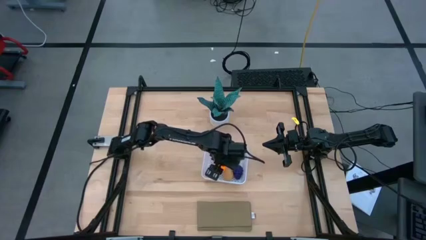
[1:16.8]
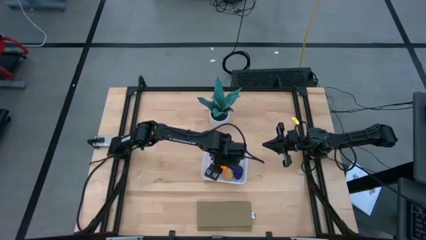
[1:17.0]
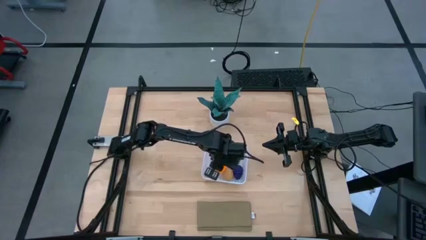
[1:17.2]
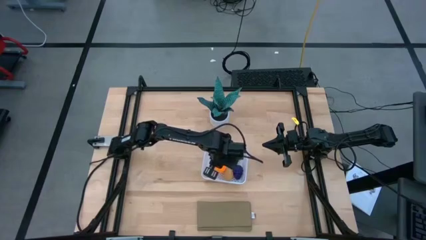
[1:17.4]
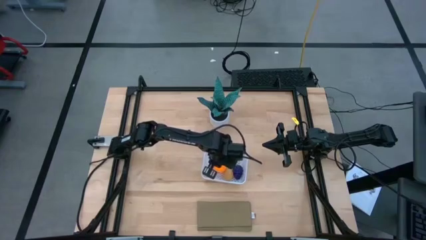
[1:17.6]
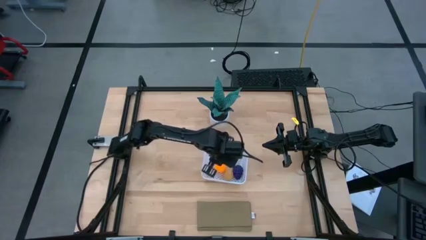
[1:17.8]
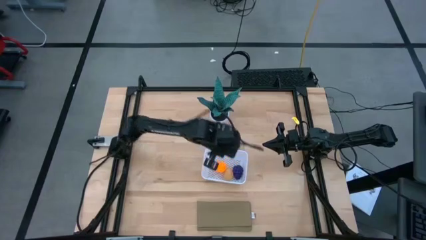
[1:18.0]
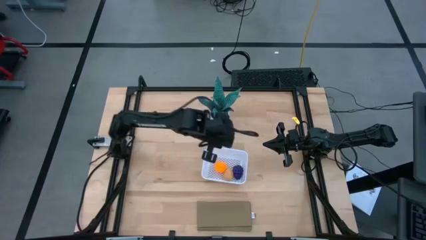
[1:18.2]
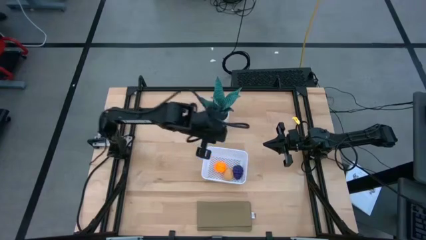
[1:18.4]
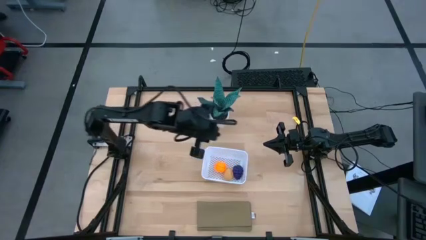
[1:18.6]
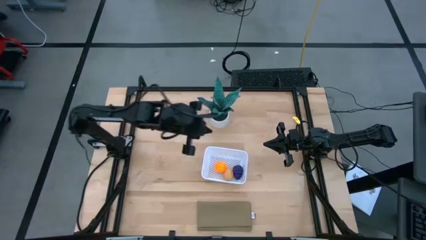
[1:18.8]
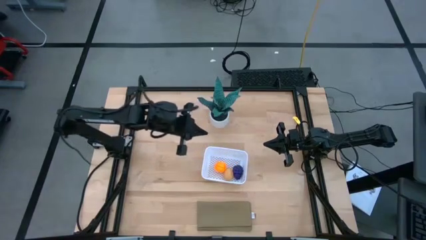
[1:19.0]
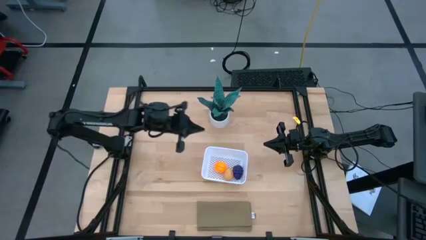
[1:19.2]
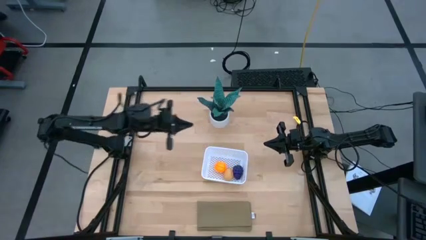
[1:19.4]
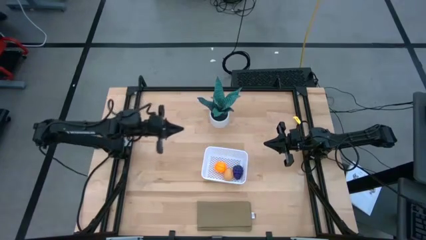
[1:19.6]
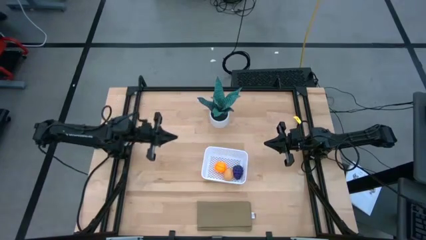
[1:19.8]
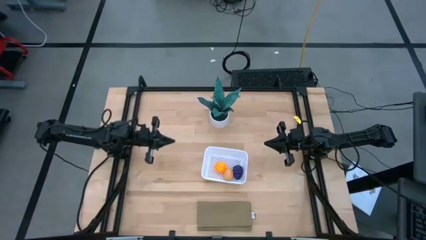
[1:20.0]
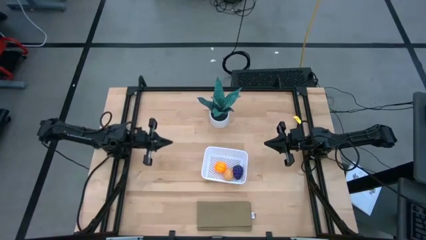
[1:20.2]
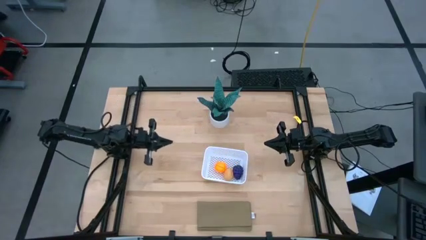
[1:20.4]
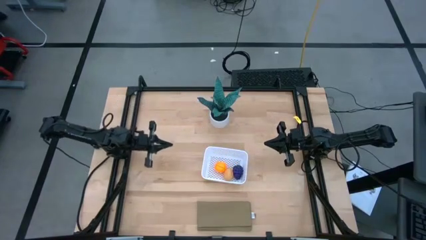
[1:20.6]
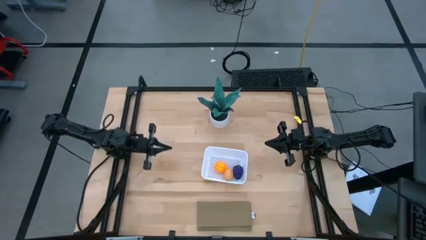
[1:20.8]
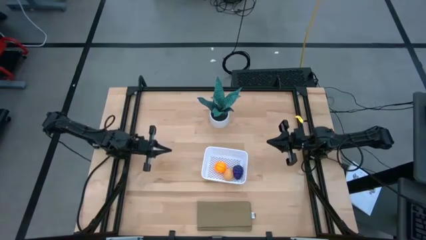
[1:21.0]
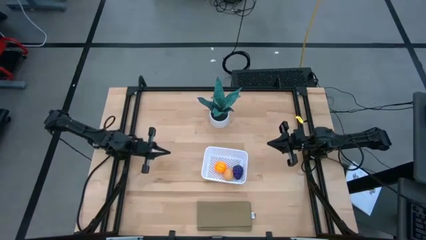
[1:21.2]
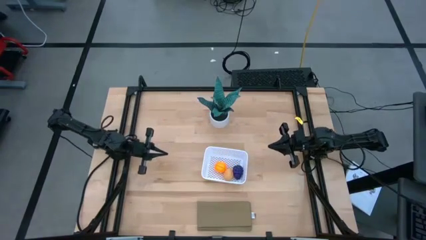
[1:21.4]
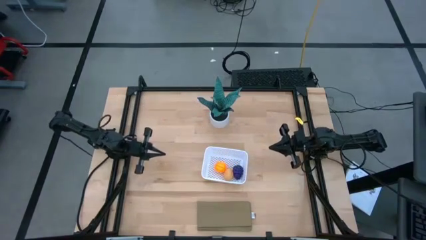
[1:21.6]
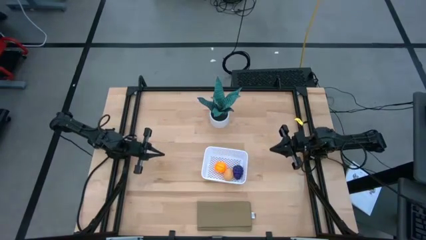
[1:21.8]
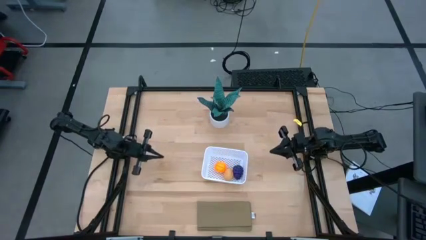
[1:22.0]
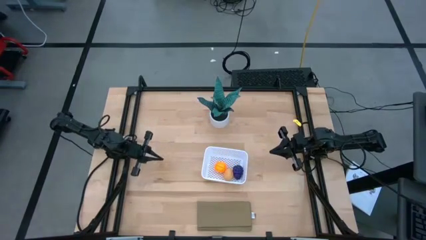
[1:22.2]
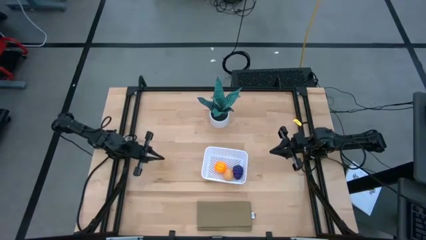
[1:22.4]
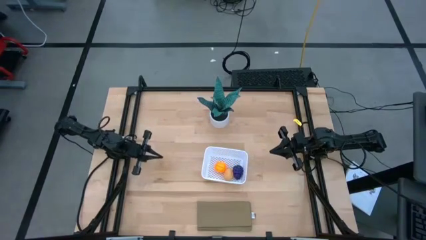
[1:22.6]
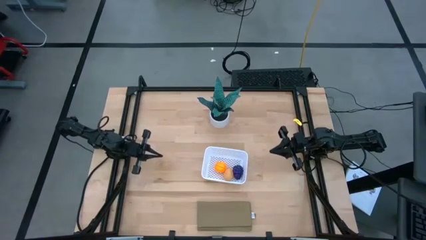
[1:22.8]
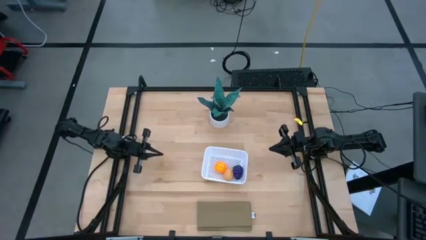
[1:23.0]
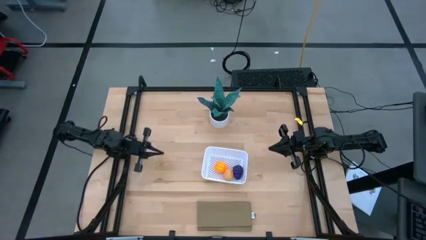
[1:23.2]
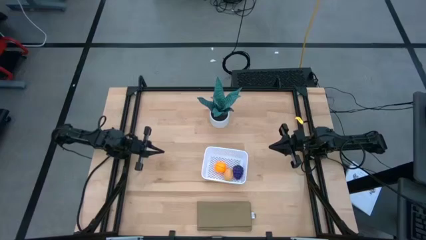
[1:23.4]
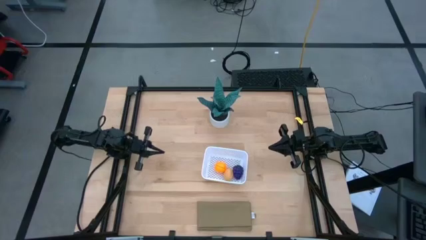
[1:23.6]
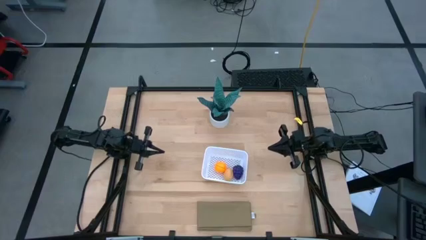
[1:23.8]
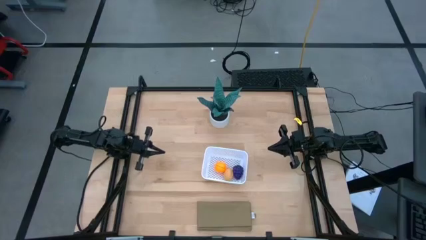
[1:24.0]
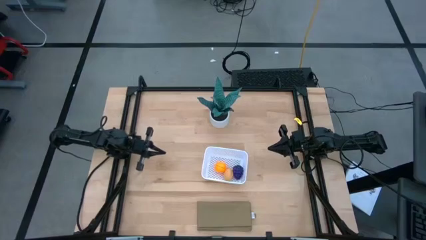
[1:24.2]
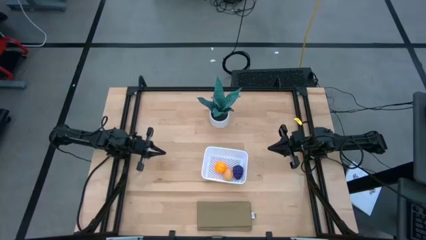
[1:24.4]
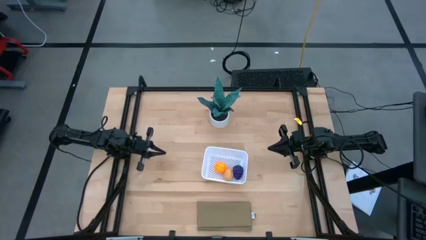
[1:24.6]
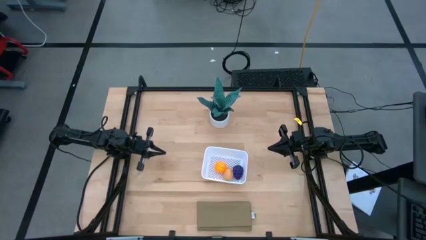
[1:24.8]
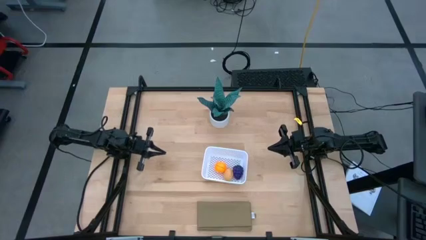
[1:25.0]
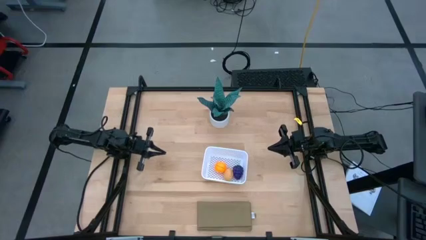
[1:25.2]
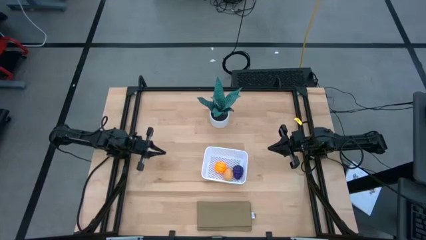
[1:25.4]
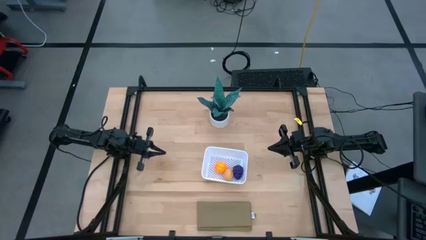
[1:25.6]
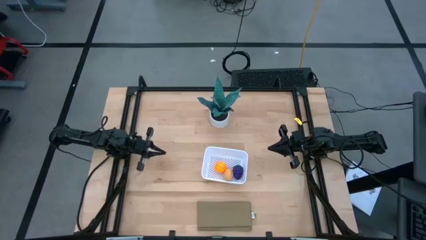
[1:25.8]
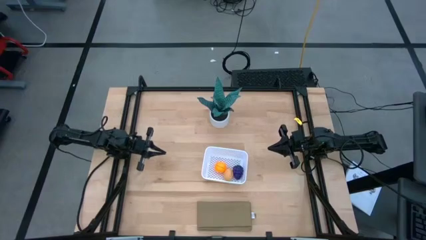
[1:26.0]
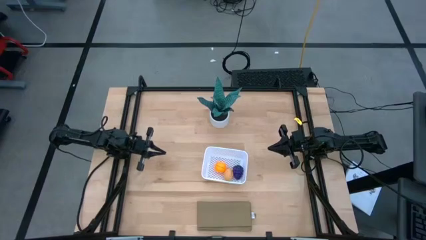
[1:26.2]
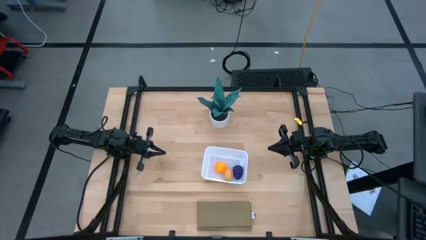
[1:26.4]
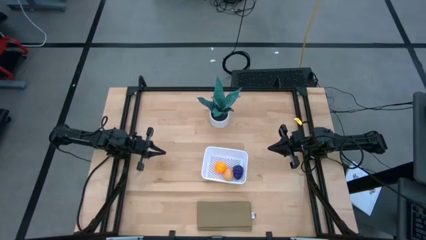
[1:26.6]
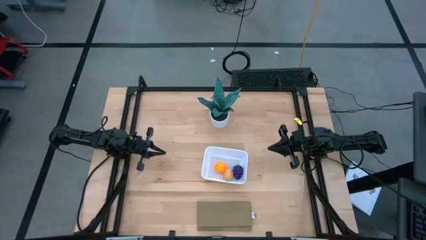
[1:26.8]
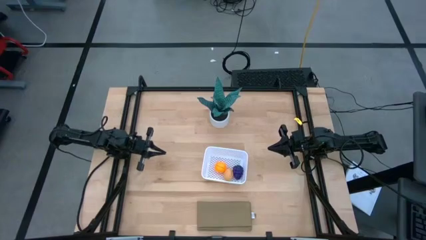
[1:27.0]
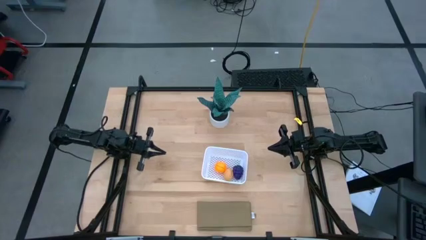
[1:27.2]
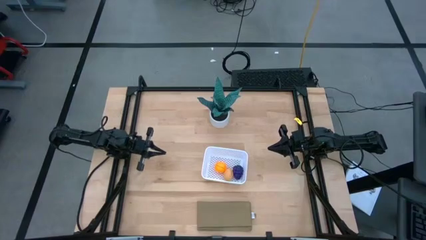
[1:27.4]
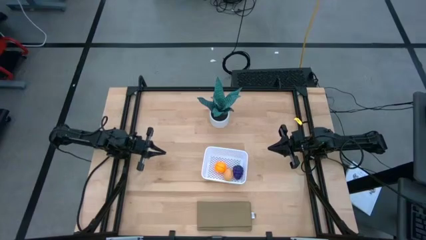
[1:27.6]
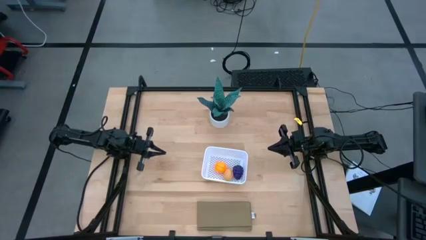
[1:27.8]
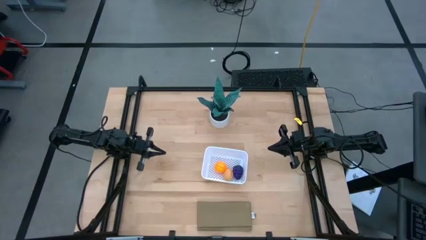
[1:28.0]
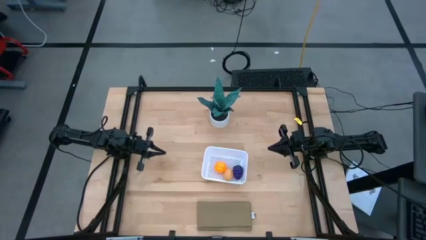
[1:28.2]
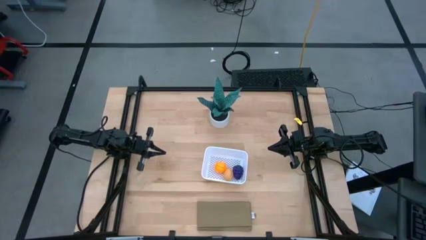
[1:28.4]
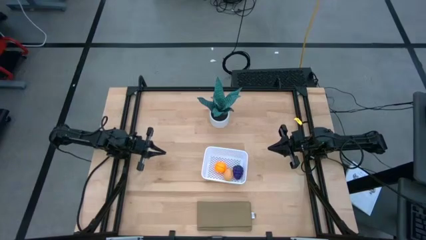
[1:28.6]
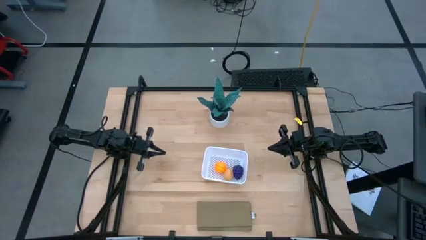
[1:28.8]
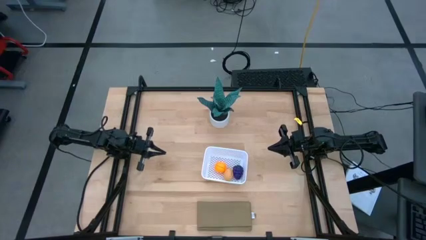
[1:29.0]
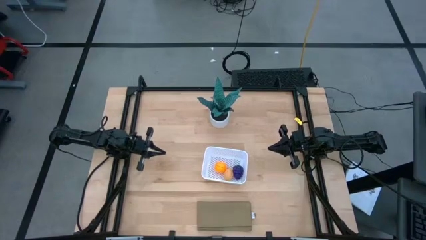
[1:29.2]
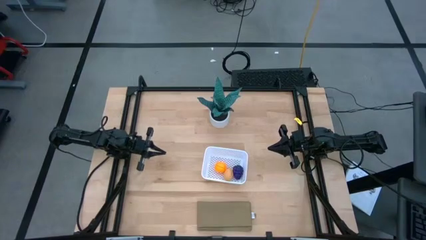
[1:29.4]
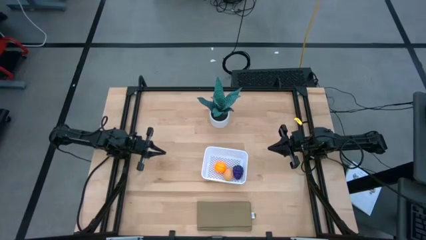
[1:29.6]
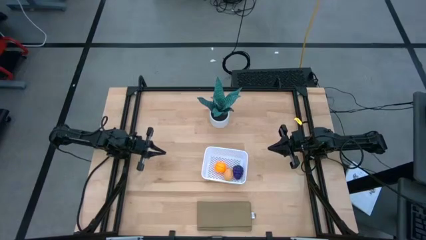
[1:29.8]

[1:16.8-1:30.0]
Task: Pick and placing Produce into tupperware
Return to Home Position
